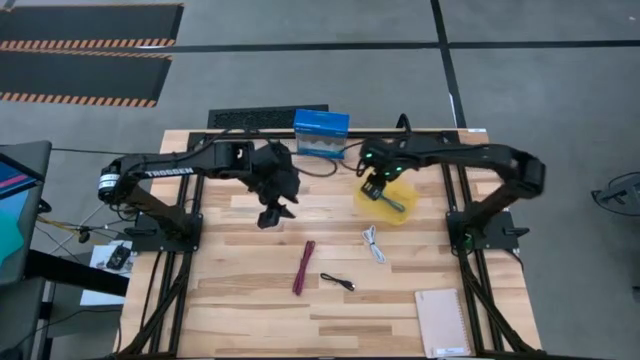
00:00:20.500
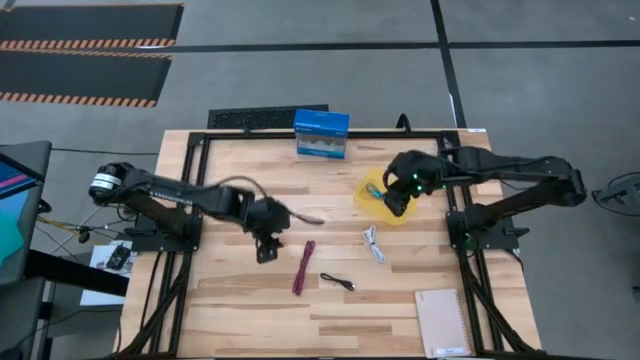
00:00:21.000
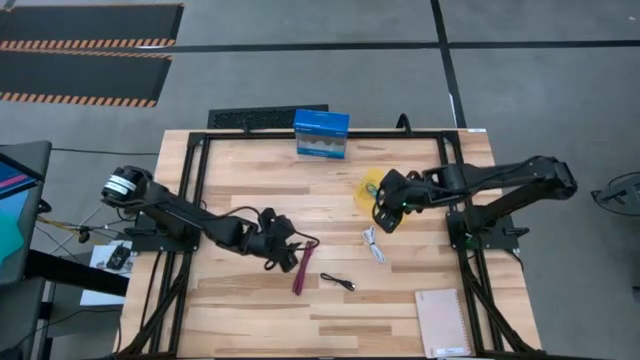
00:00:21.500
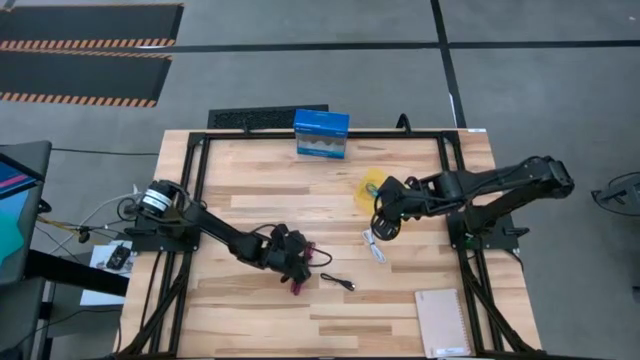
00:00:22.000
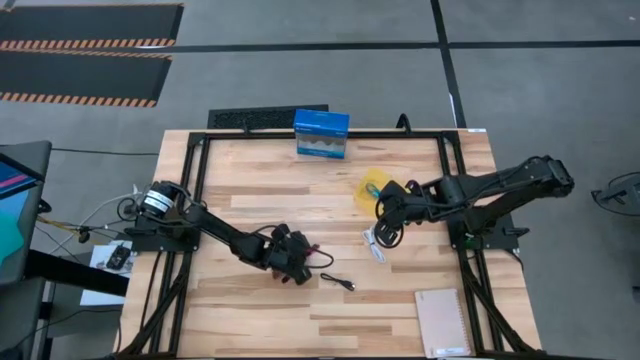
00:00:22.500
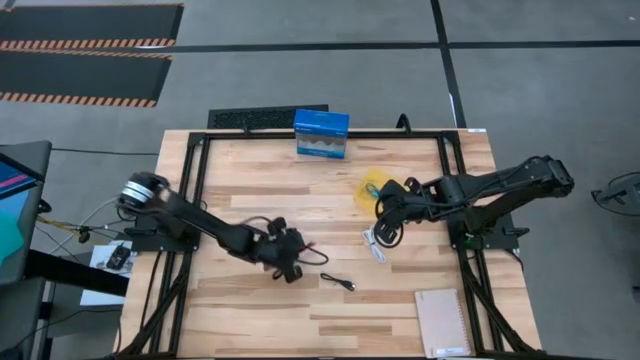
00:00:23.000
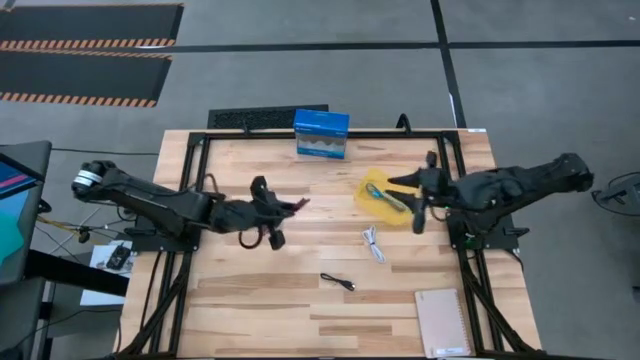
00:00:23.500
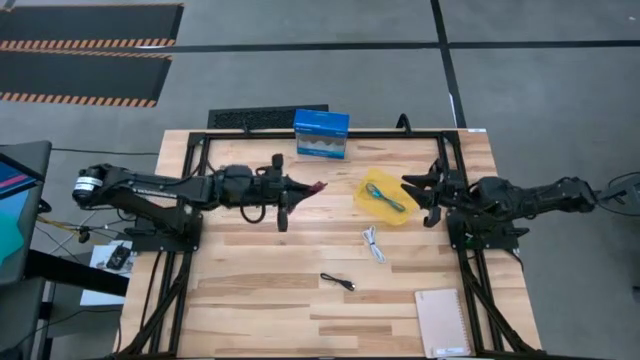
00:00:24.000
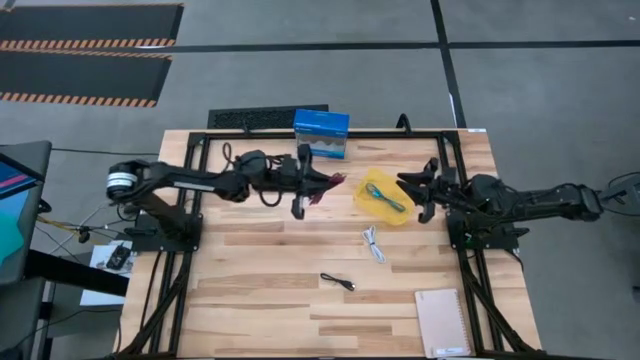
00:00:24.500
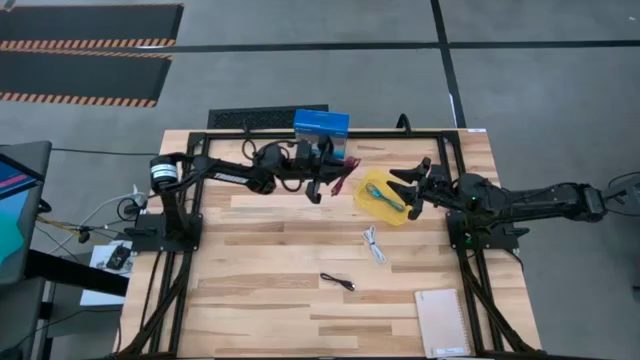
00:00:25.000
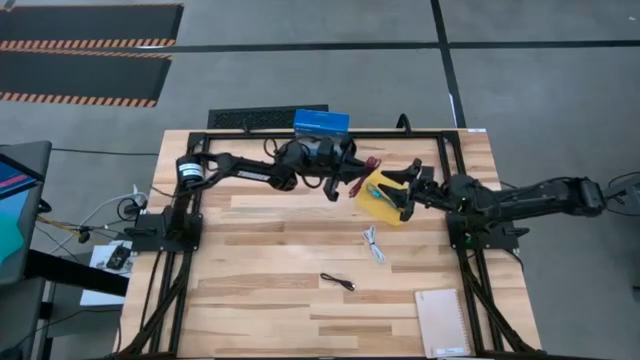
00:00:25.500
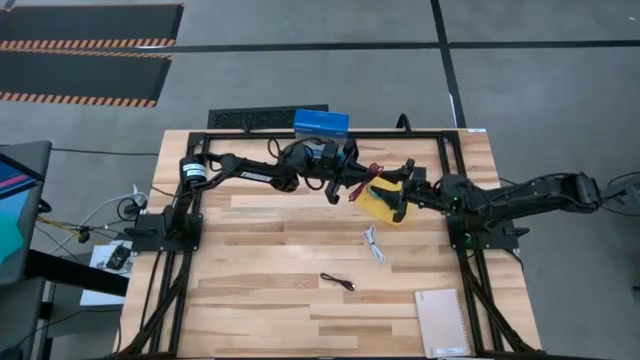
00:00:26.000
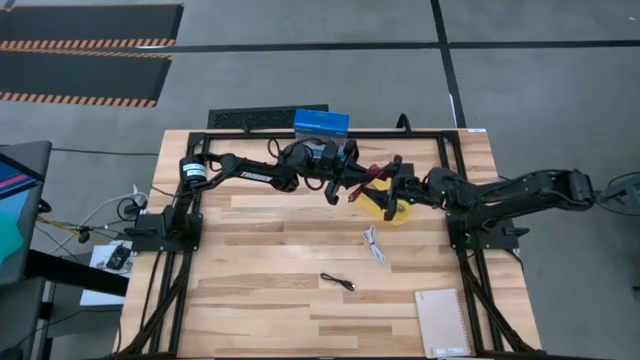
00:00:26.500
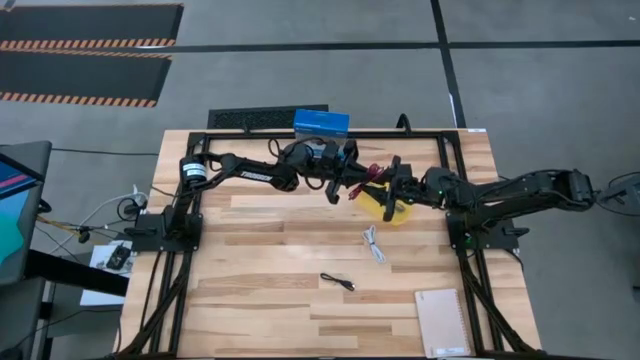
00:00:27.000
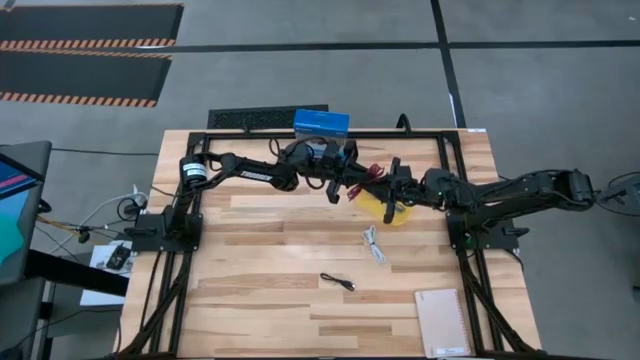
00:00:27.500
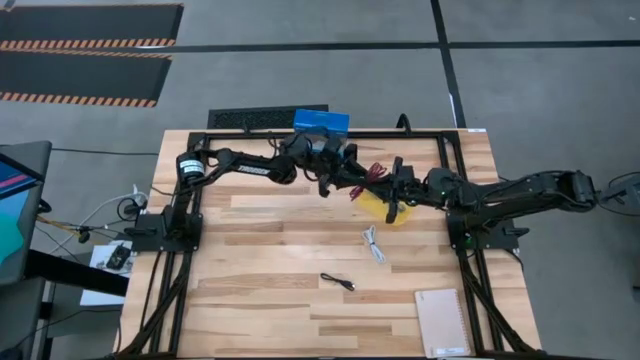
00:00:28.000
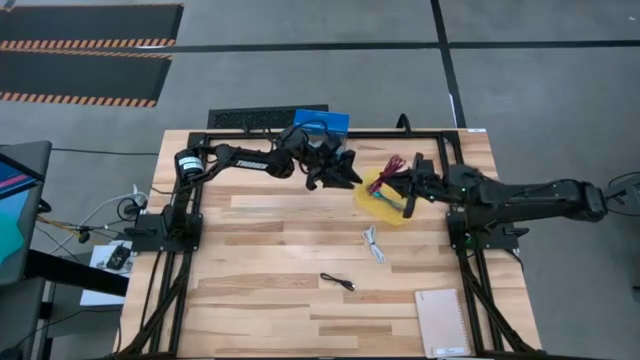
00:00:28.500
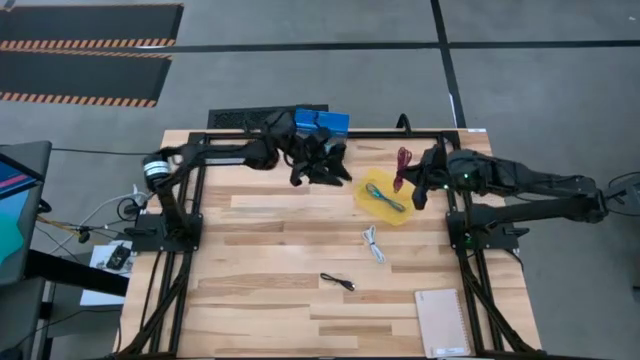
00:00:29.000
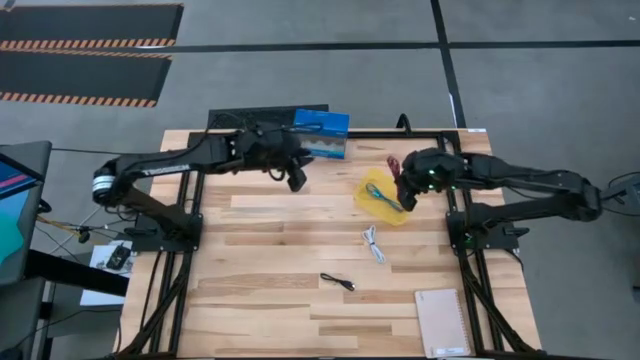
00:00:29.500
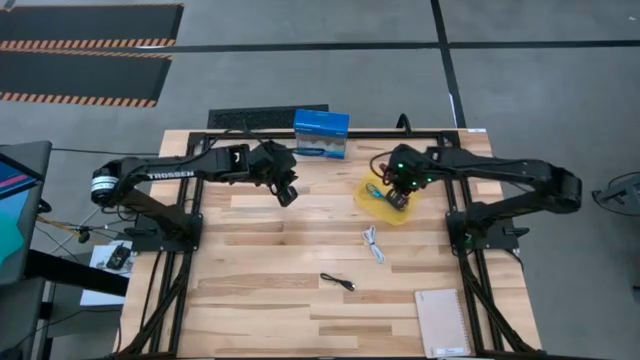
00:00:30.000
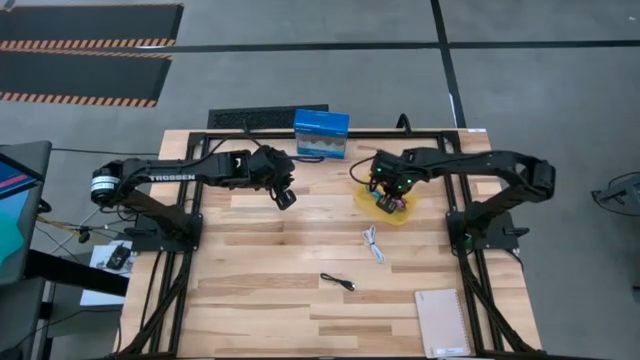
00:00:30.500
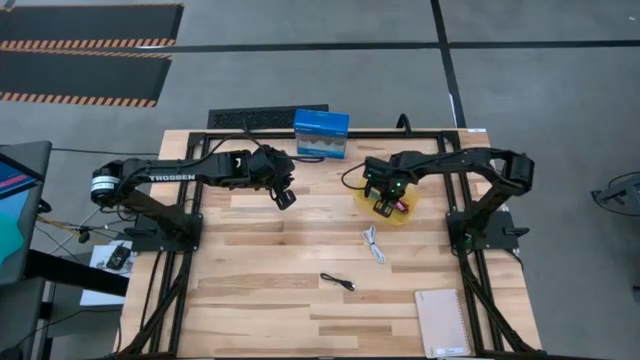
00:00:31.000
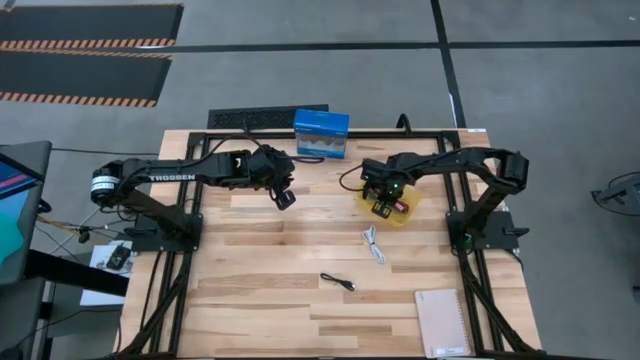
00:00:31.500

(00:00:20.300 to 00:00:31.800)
Task: Pick and place USB-C Cables
Put the pink charger cable into the yellow bin

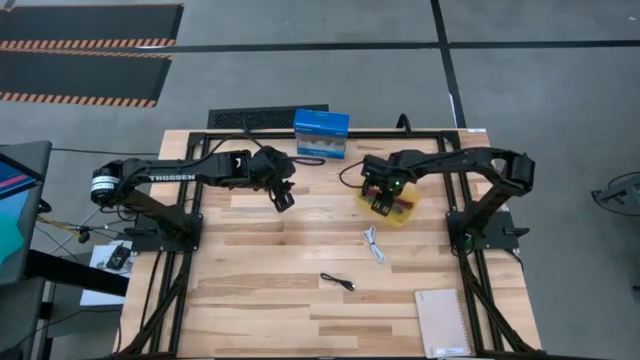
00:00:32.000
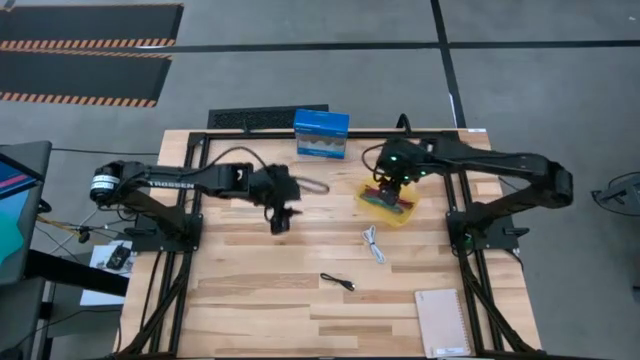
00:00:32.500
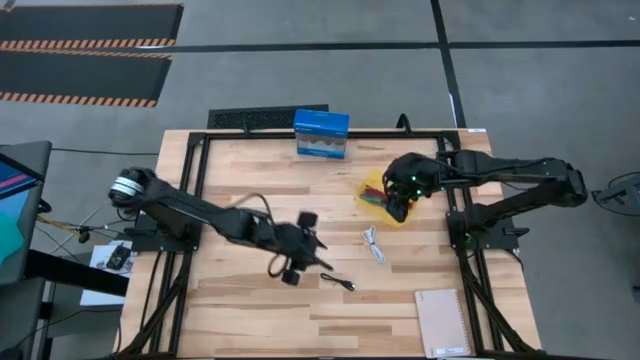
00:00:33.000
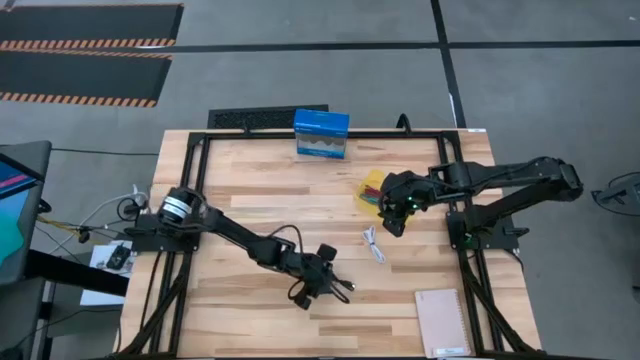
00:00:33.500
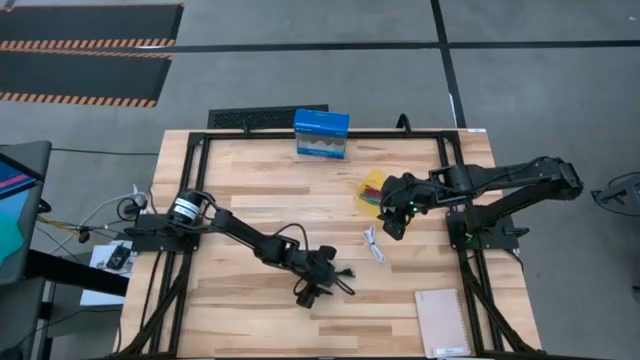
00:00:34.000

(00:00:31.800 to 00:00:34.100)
Put the black charger cable into the yellow bin

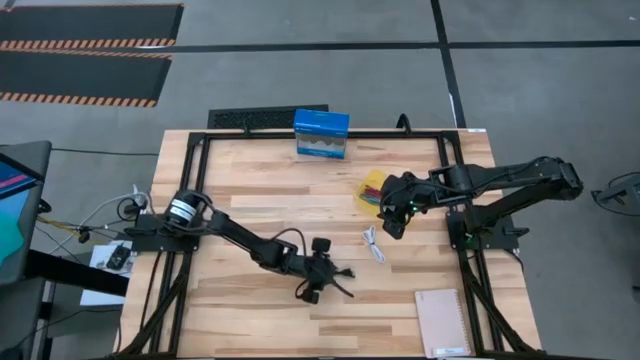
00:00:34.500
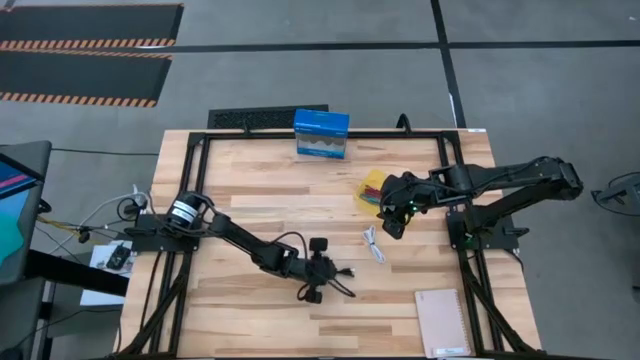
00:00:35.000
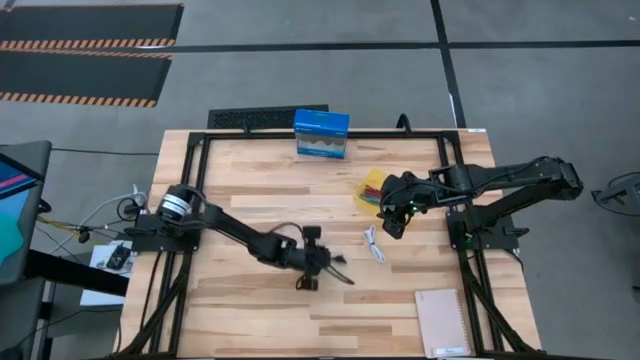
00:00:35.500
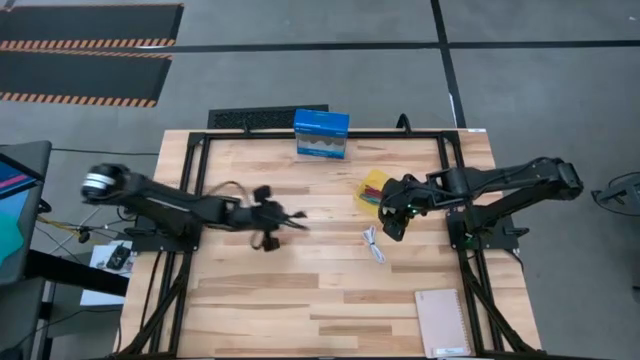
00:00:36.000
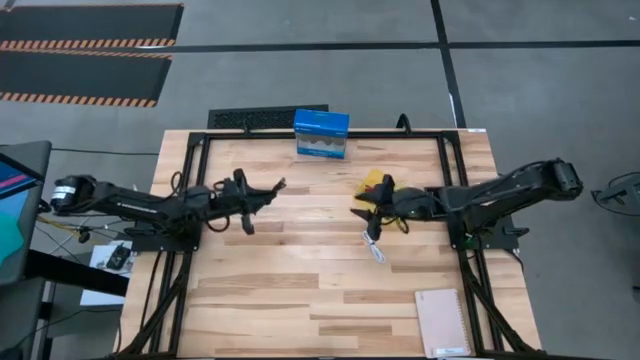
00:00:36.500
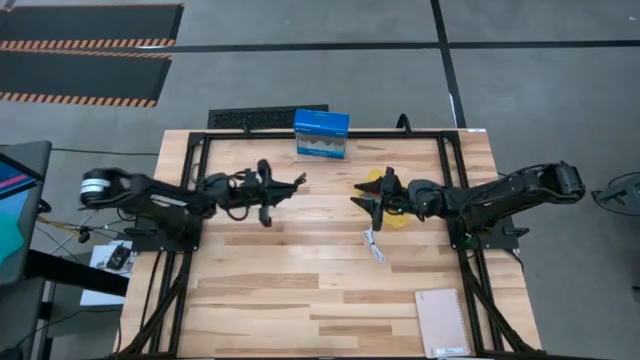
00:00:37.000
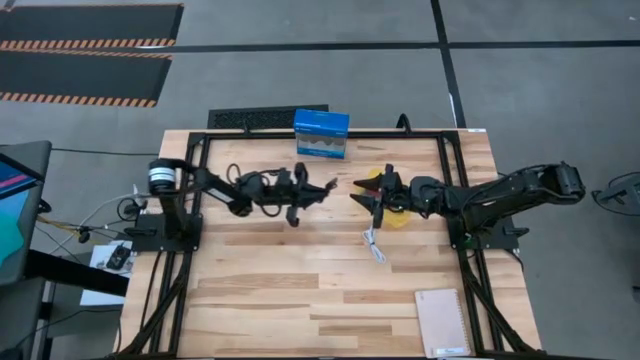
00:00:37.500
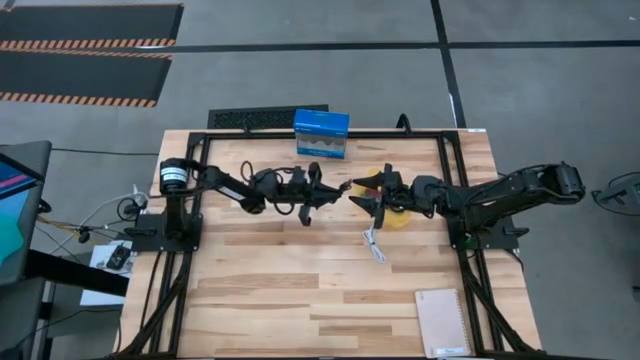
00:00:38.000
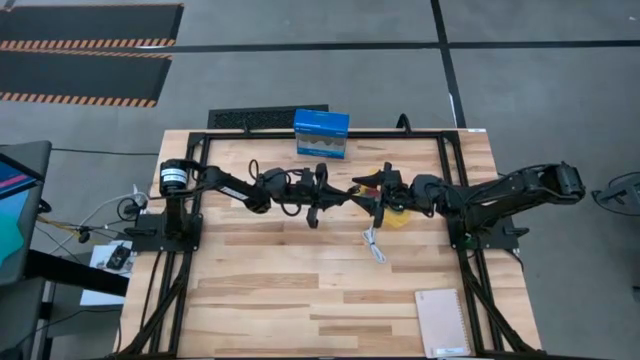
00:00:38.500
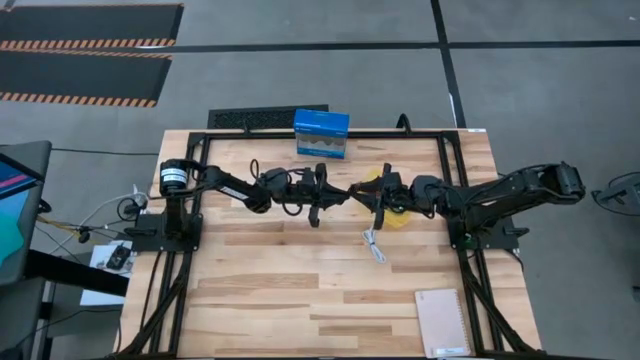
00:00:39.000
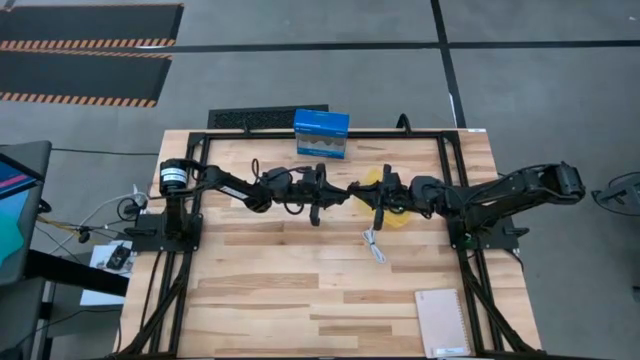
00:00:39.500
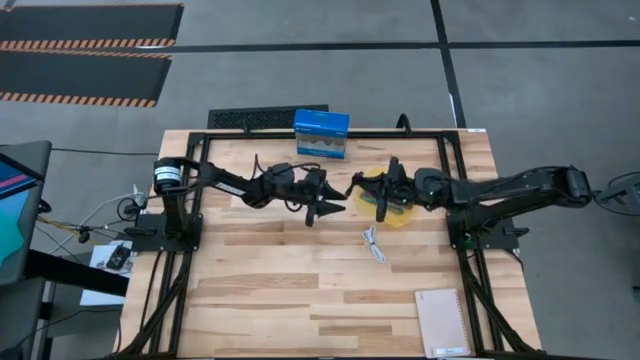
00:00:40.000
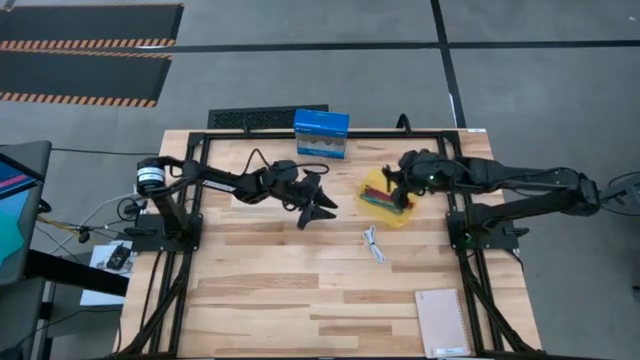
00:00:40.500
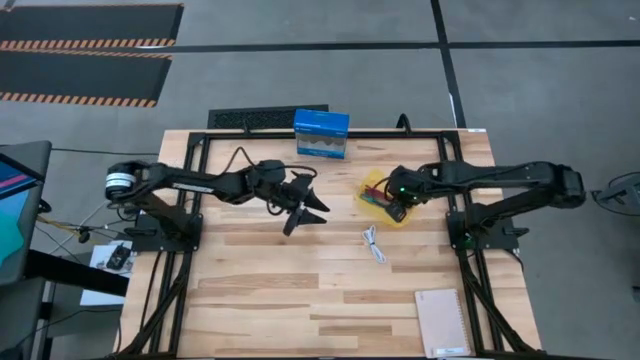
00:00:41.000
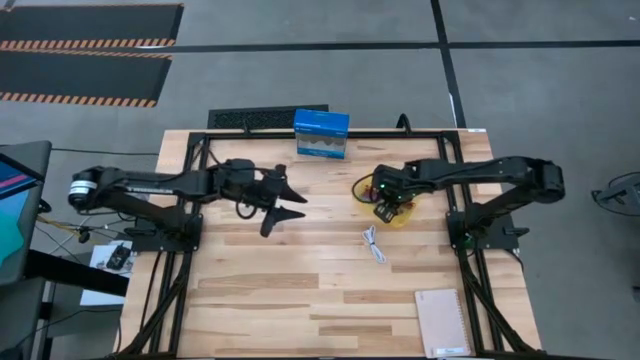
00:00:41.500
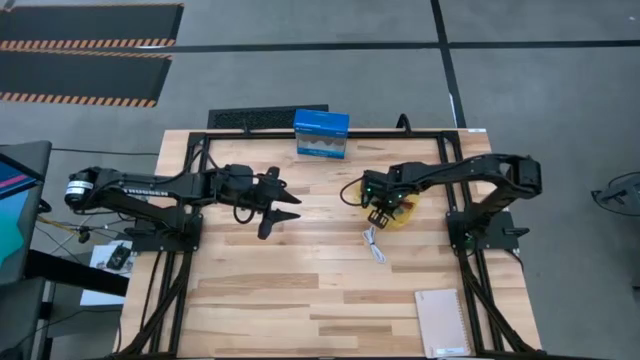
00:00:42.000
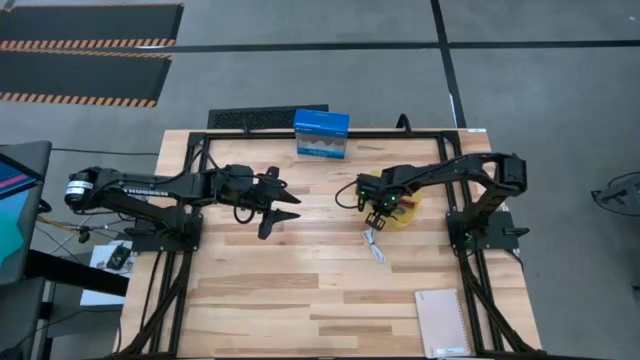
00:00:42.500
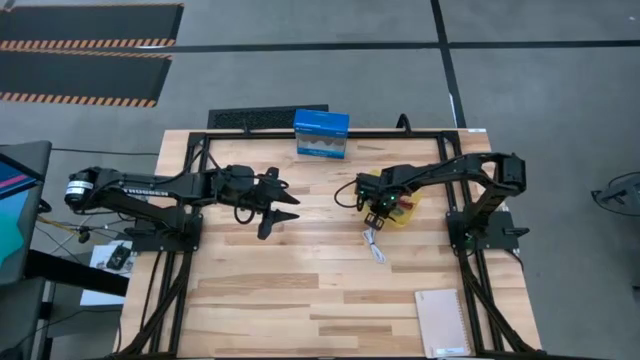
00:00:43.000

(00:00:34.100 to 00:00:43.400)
Put the black charger cable into the yellow bin
